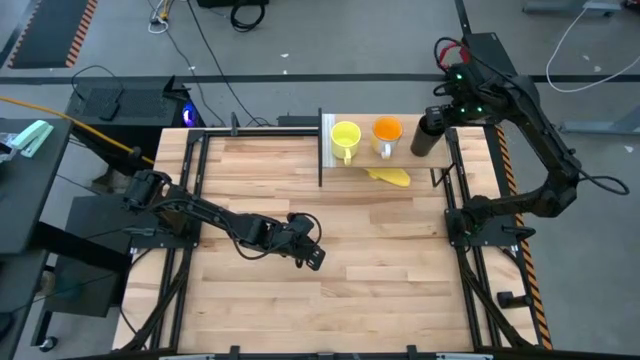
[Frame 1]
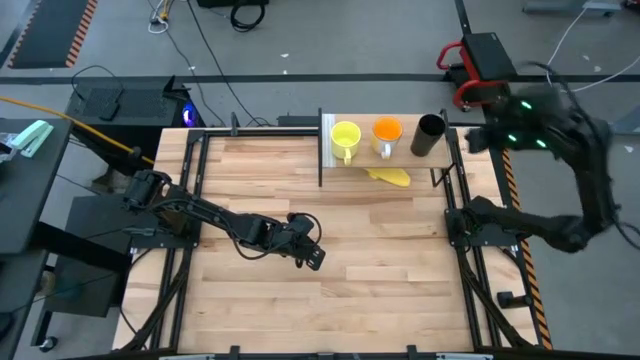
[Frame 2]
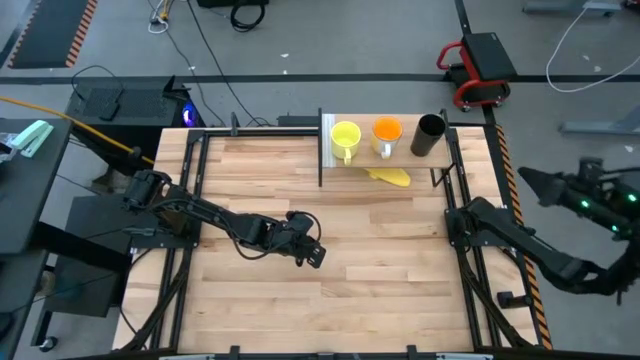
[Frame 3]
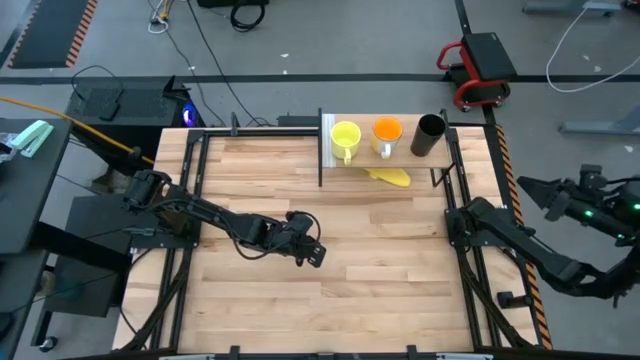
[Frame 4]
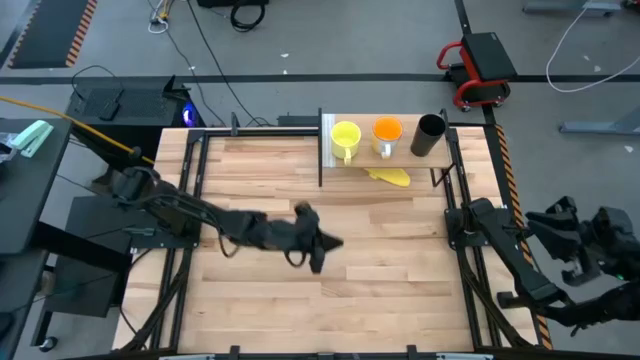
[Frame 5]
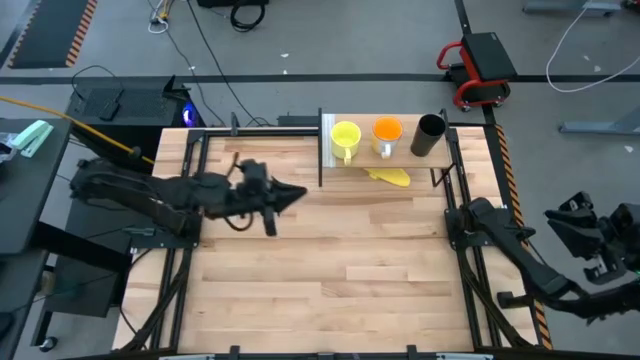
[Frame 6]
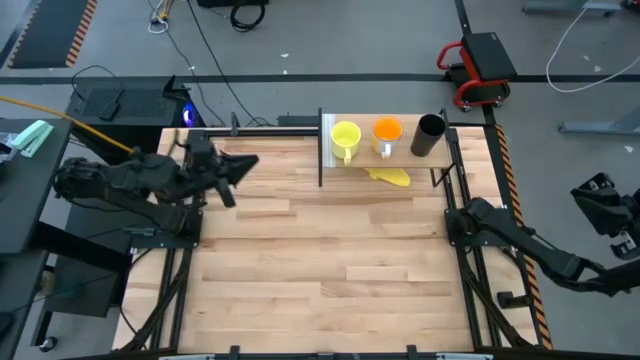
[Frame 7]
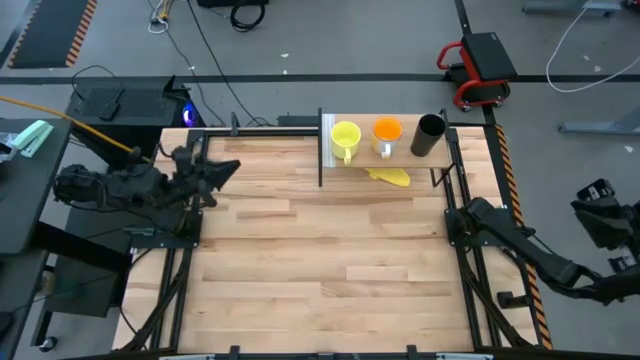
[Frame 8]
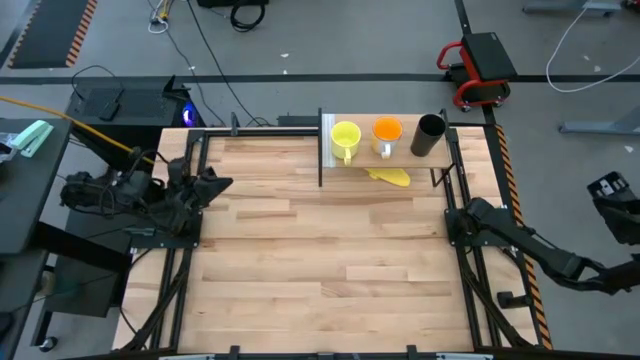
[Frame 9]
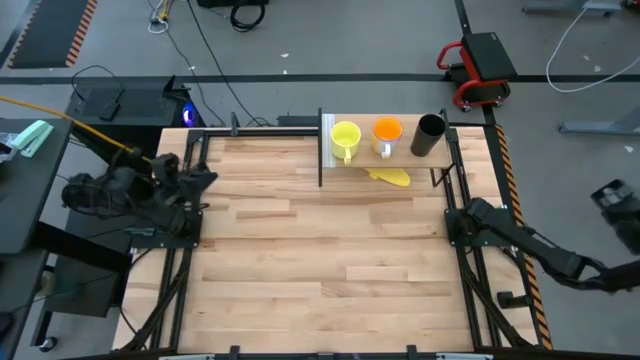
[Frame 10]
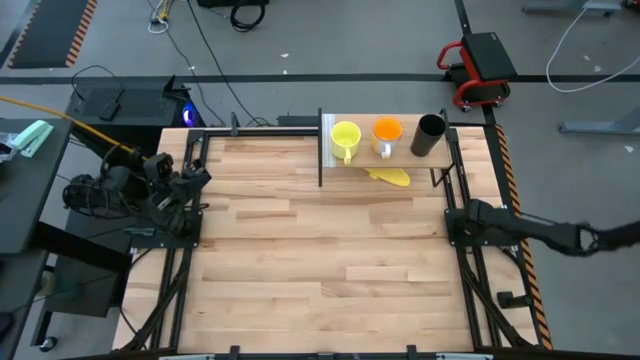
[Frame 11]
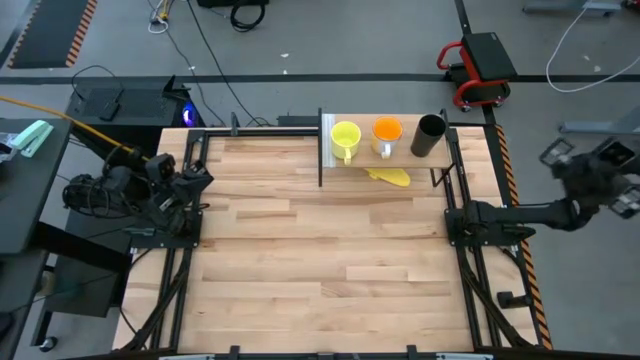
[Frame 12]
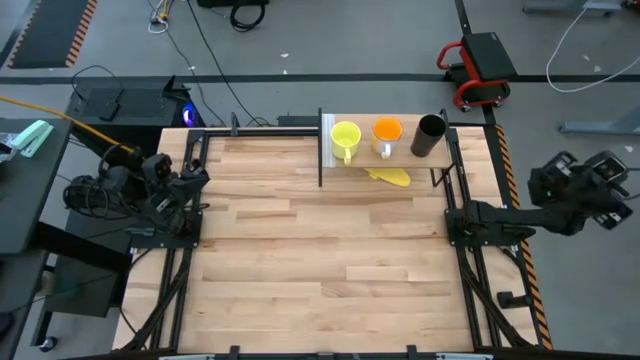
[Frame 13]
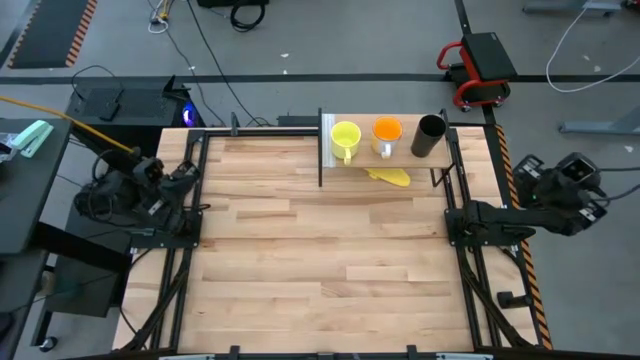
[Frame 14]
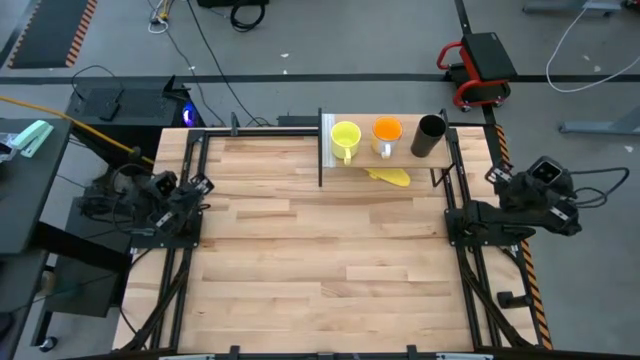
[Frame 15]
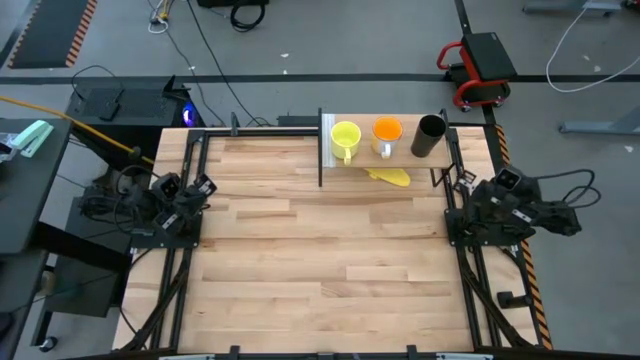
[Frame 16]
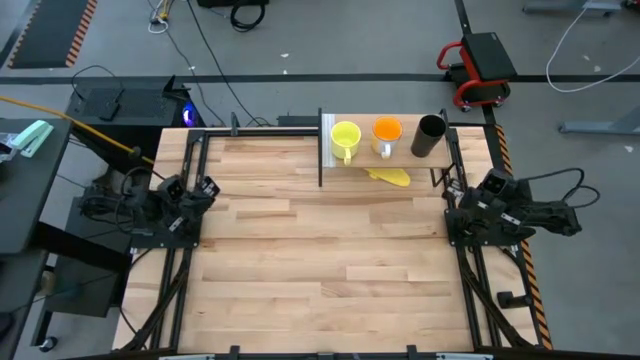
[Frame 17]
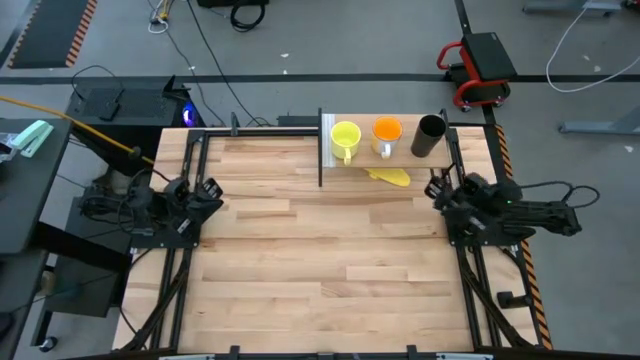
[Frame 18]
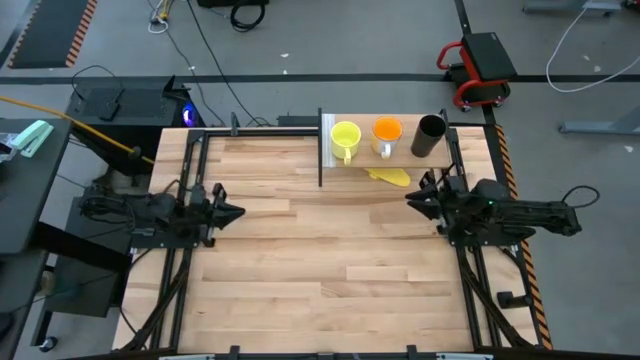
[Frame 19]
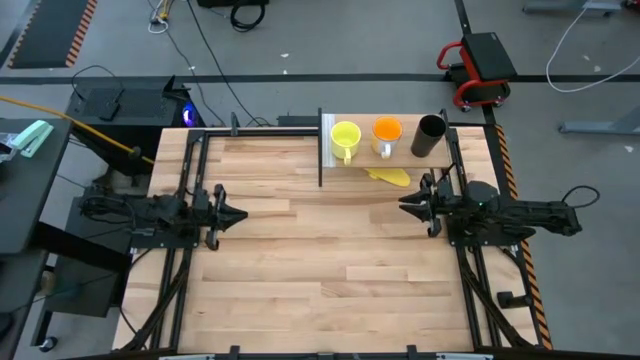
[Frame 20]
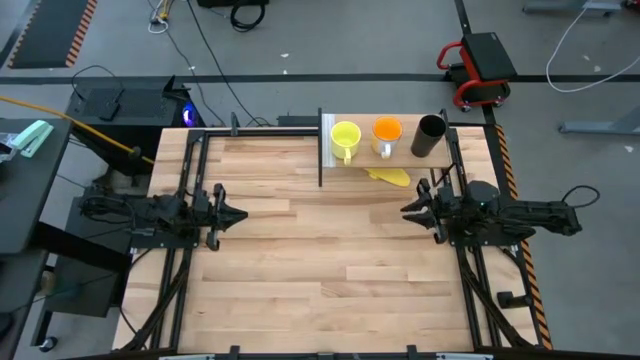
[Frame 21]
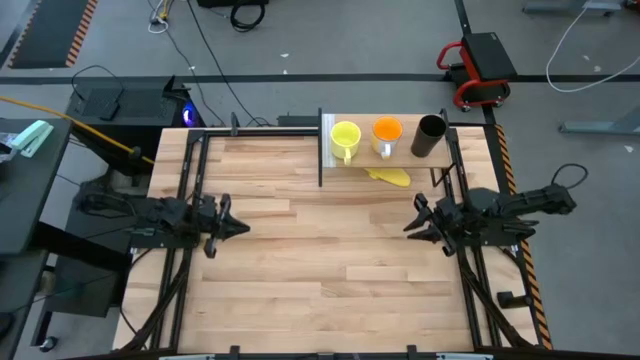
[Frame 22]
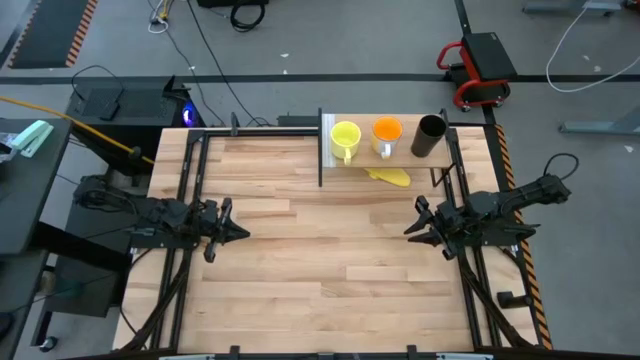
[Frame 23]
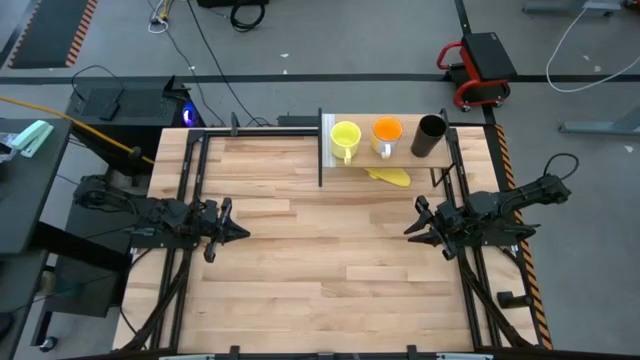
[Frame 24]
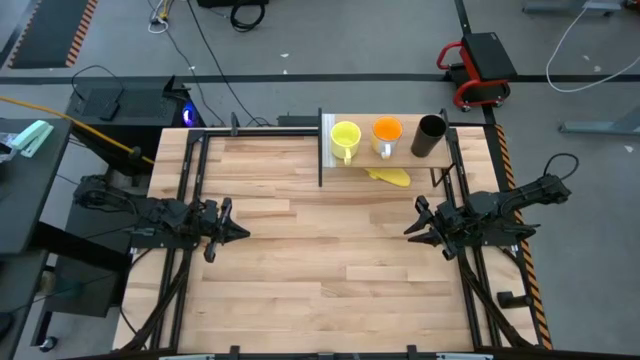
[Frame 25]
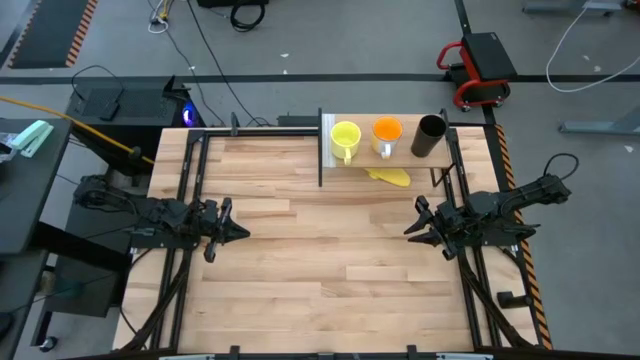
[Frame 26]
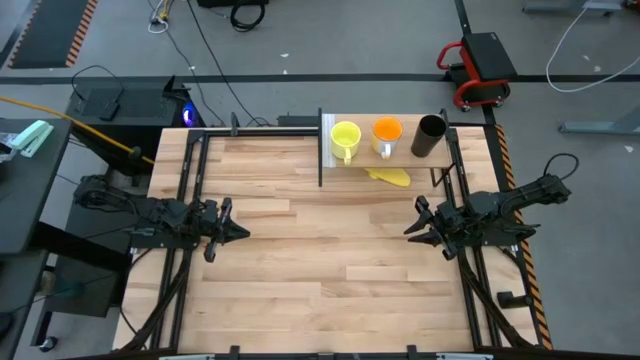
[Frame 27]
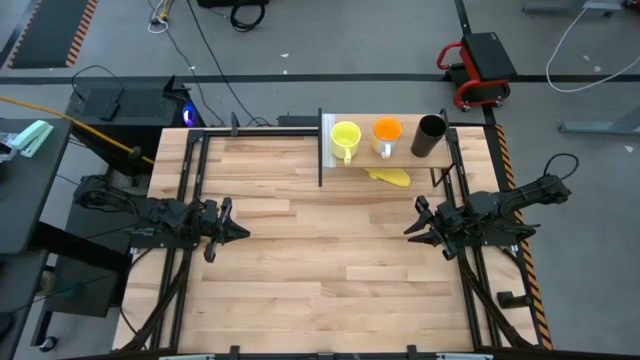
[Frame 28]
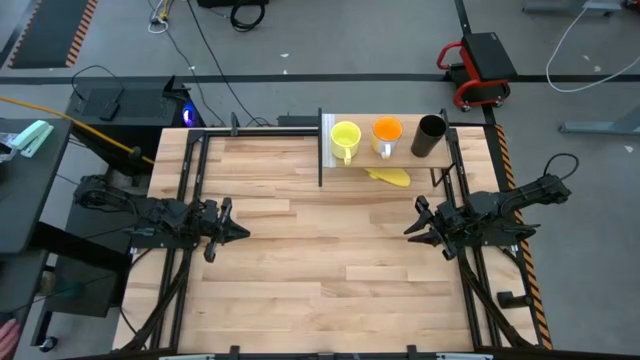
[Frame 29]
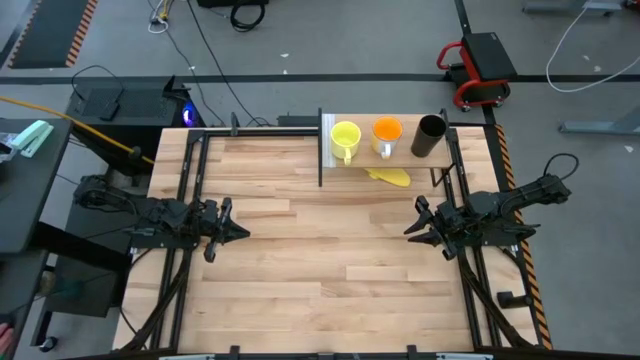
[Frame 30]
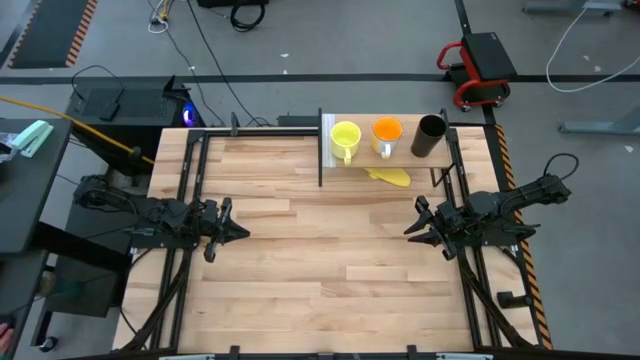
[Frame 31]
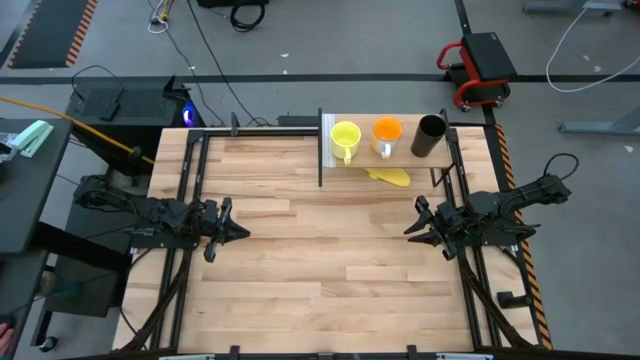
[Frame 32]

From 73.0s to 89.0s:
Task: Stack small to large cups/mugs on shelf
Return to Home Position

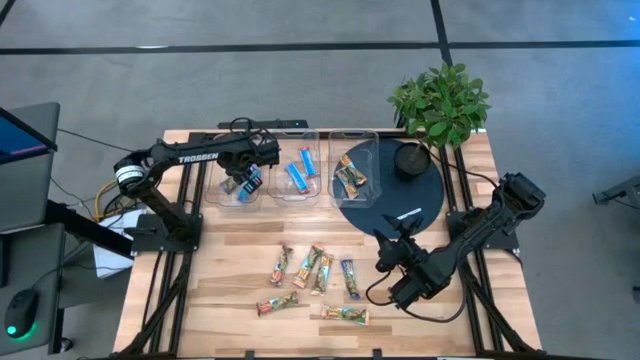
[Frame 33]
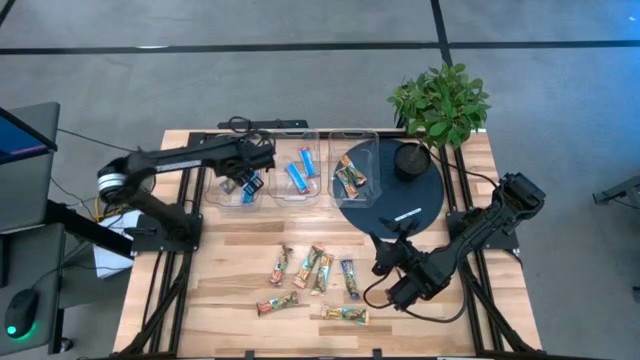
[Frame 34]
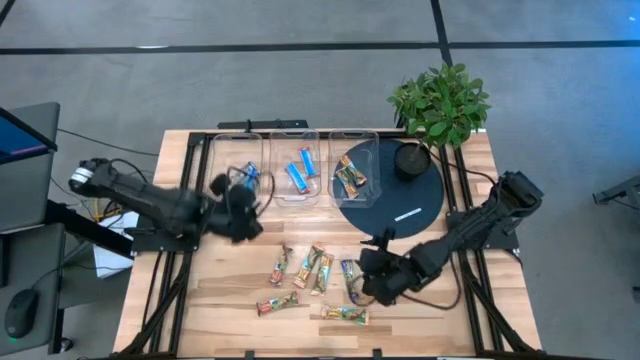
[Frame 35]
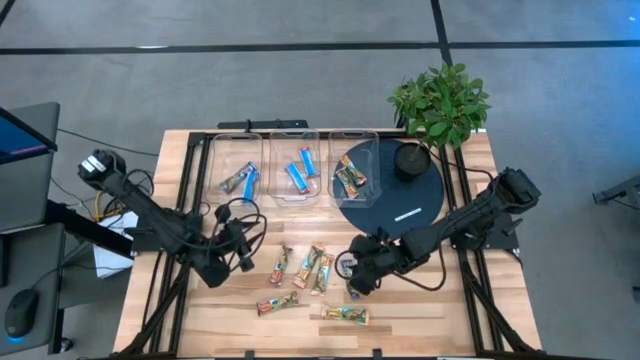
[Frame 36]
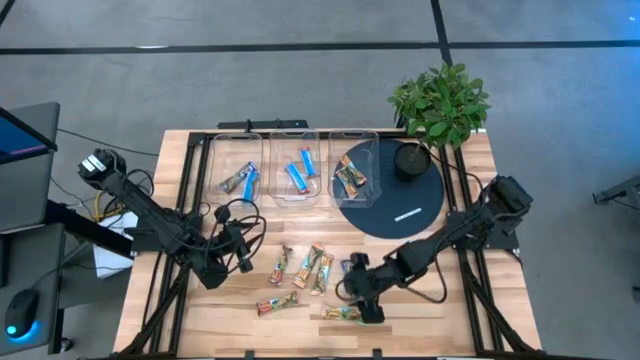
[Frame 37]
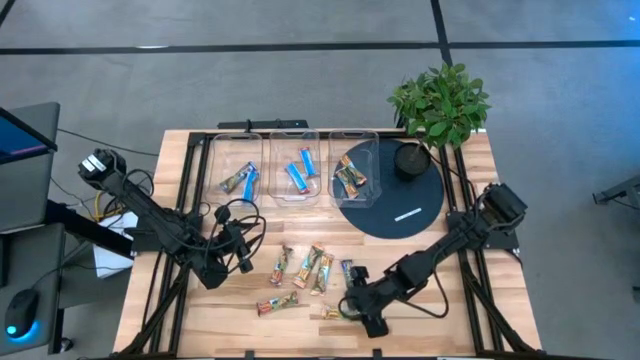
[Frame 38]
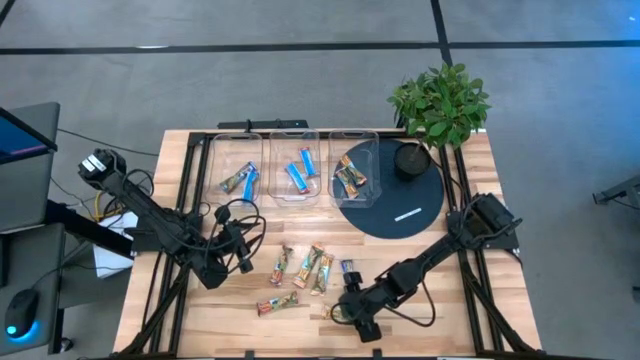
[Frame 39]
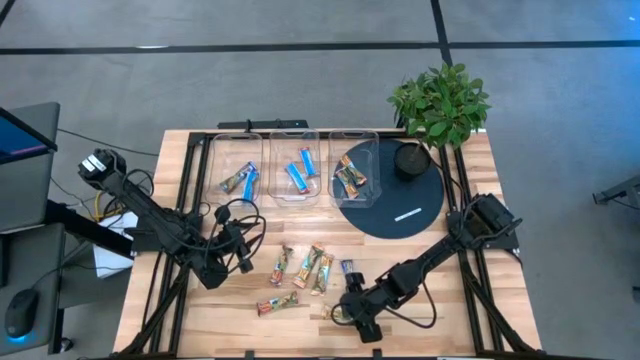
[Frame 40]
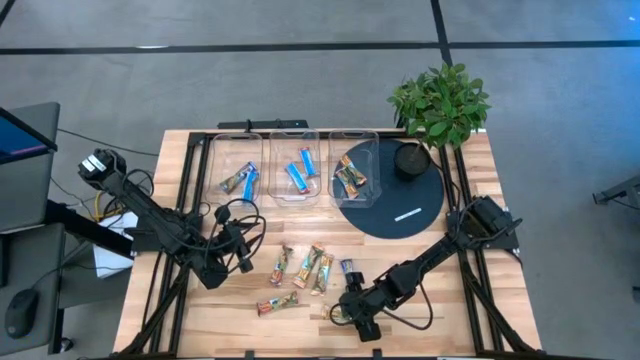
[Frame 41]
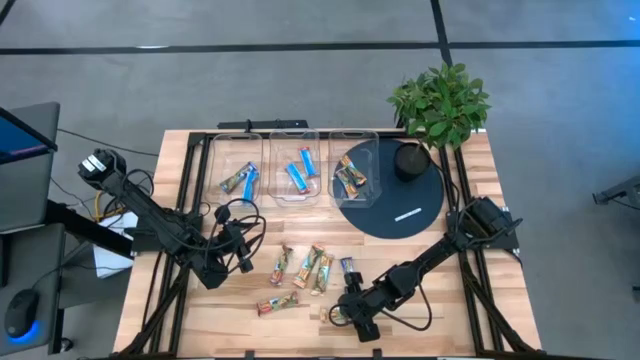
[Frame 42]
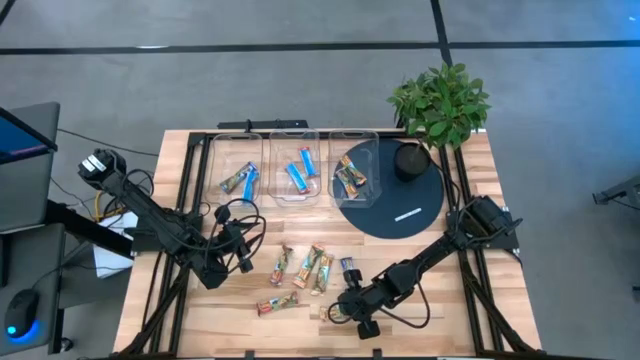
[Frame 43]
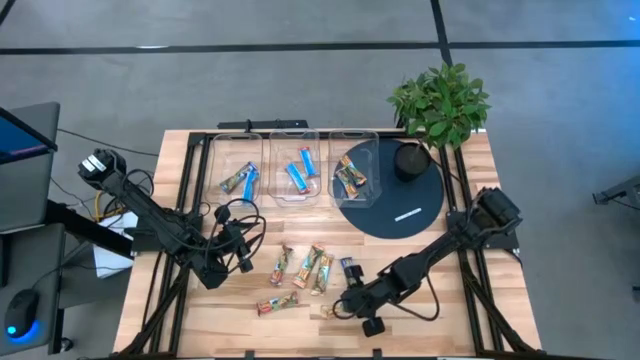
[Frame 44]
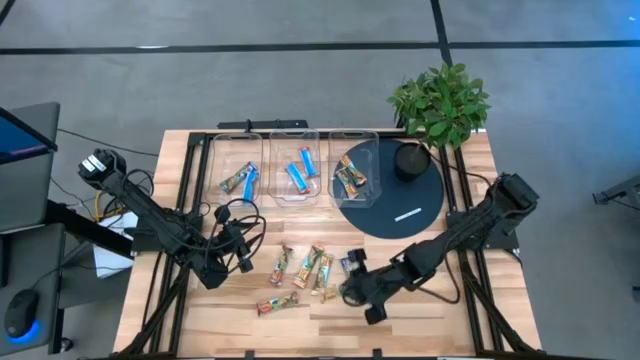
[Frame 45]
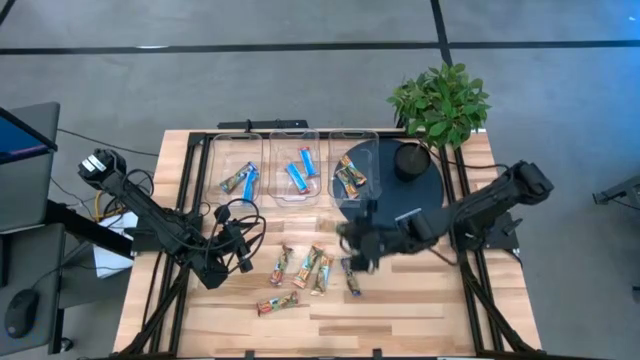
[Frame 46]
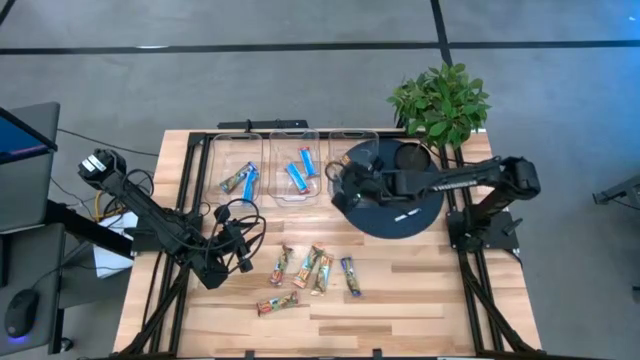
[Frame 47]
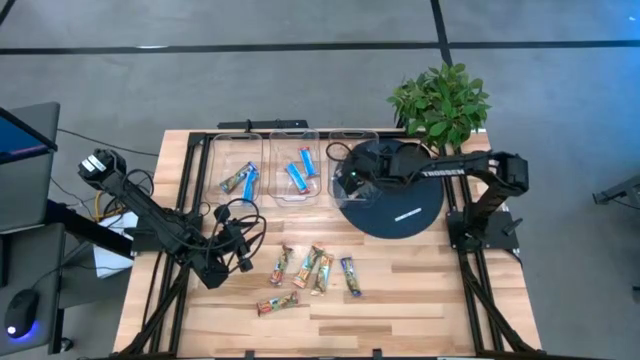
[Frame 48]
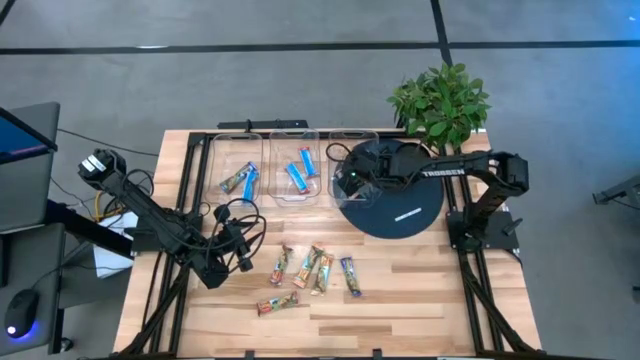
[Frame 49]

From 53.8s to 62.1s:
Task: Pick and place Granola Bars by type
Put the orange chocolate chip into the right transparent bin
